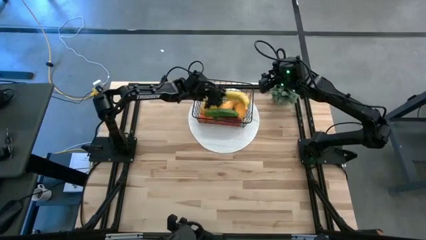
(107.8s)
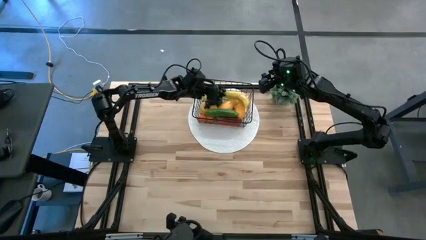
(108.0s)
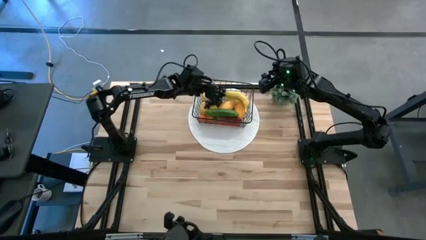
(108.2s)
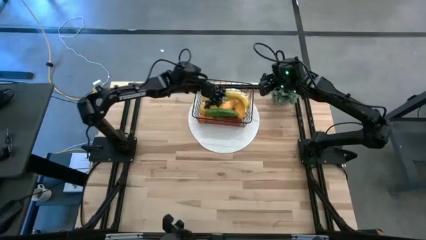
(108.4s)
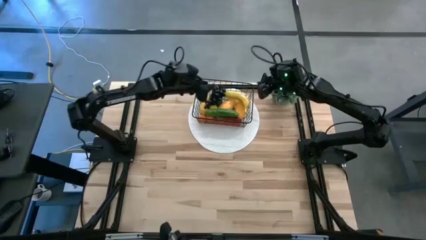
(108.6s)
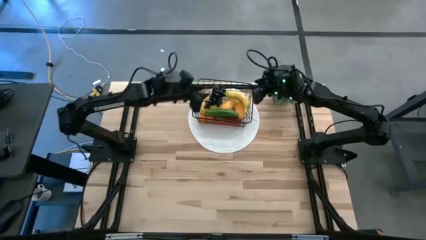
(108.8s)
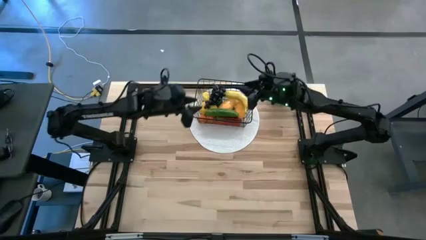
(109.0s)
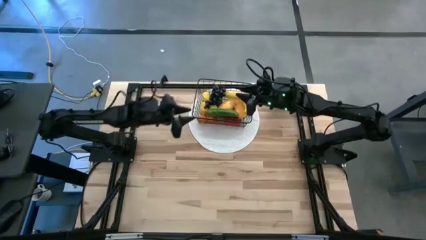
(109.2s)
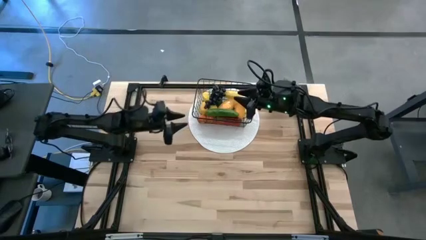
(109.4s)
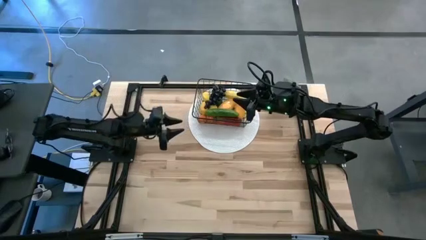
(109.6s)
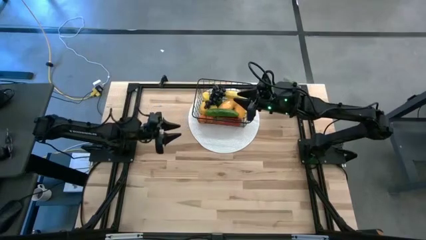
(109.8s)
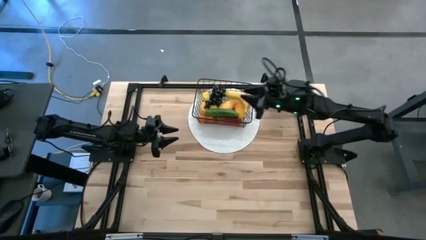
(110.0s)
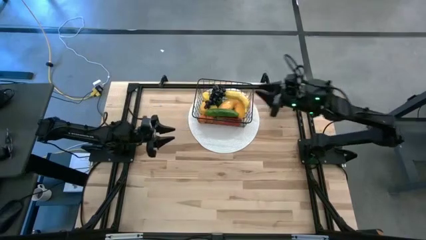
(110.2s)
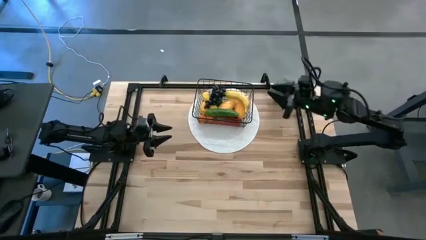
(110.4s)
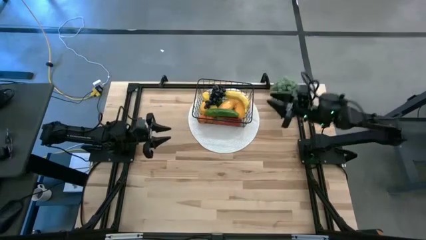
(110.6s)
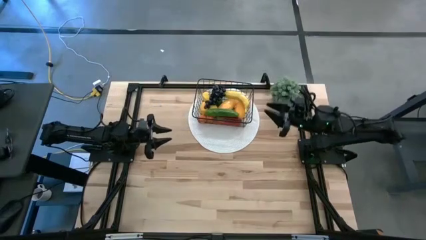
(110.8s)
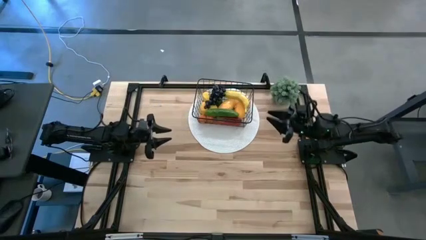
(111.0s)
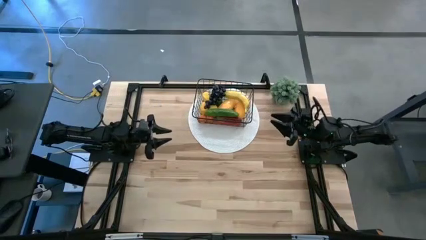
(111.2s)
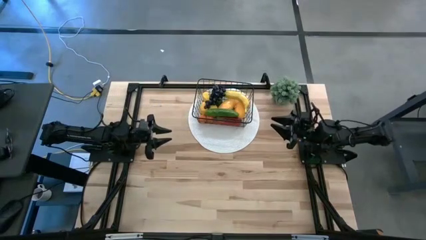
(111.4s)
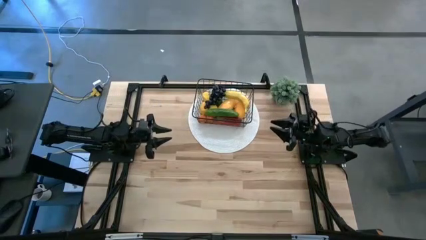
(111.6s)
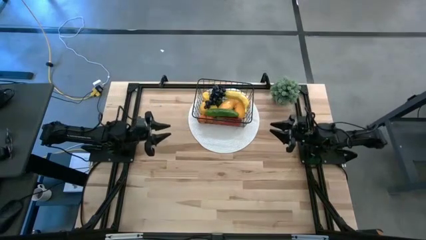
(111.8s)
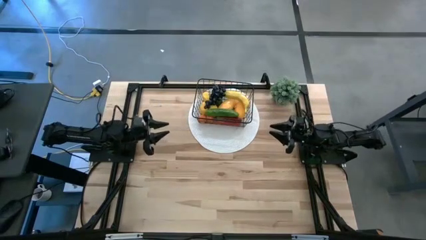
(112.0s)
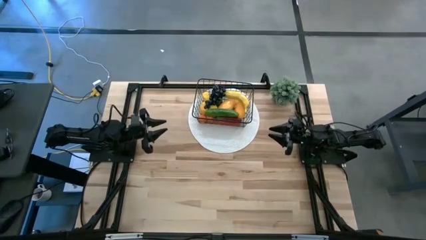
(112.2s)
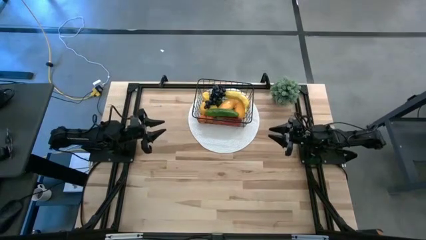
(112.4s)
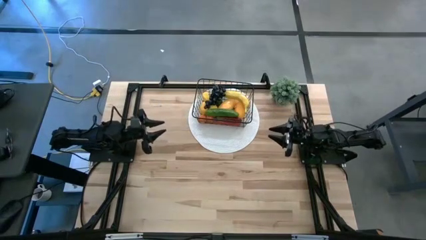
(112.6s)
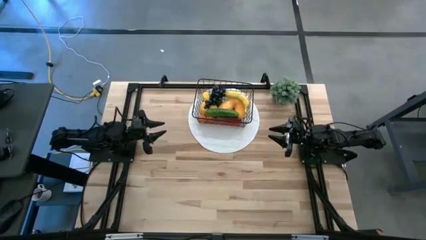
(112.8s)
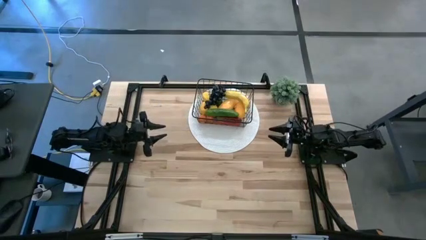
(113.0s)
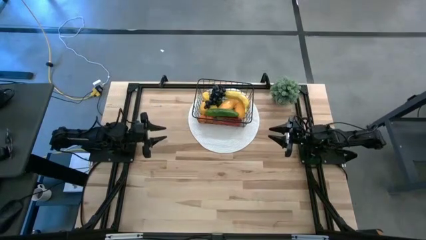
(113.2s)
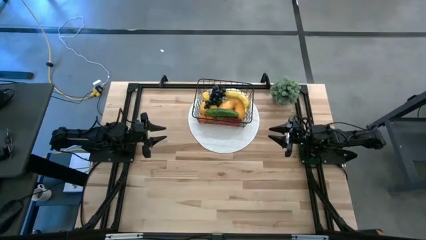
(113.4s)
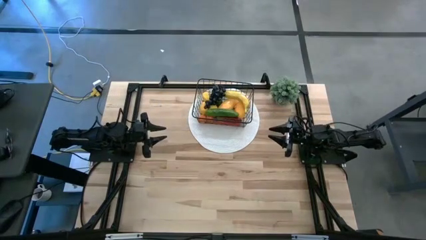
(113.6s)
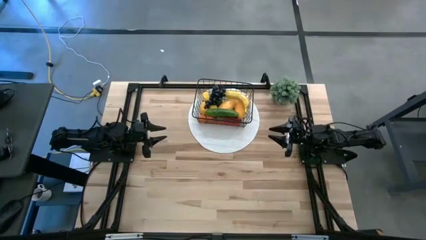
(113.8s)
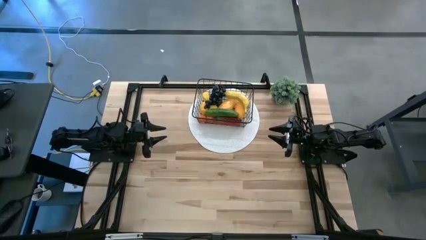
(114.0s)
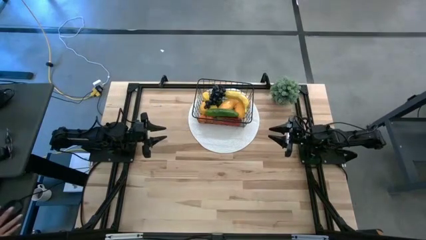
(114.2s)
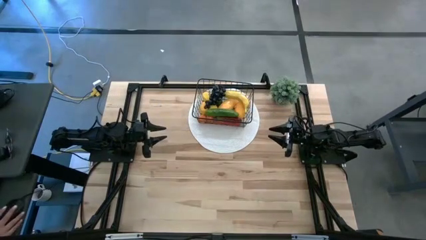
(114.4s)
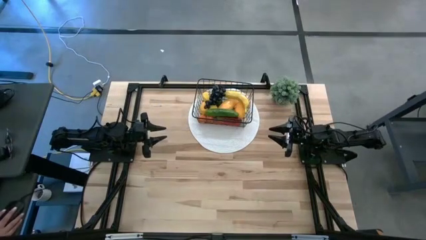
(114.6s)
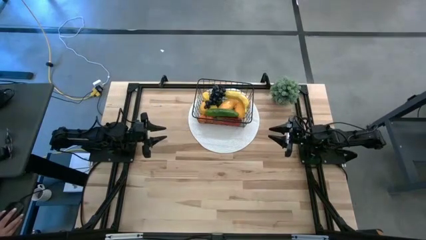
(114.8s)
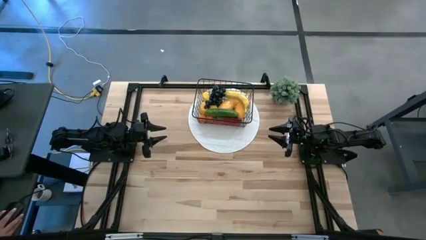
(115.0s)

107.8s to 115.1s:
Task: Build produce basket
Return to Home Position

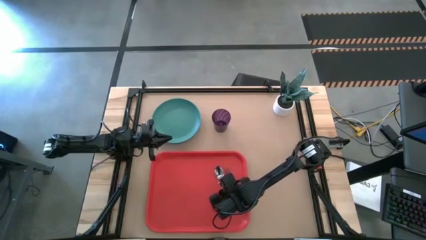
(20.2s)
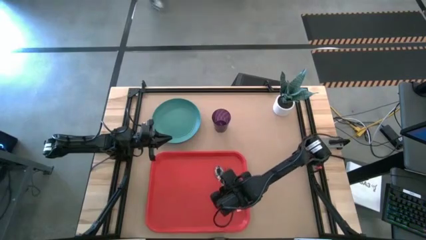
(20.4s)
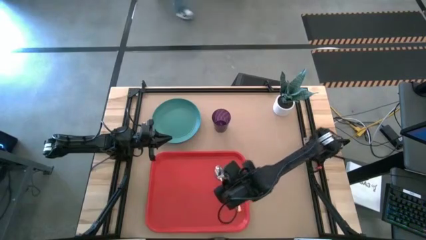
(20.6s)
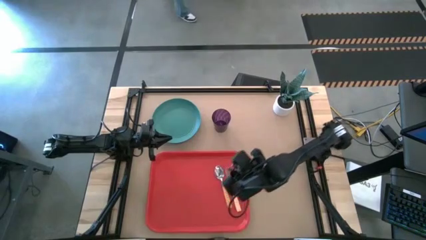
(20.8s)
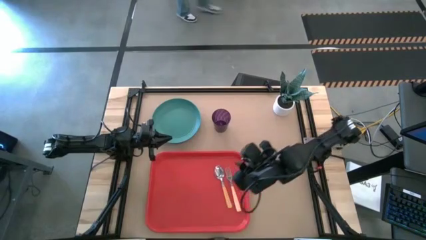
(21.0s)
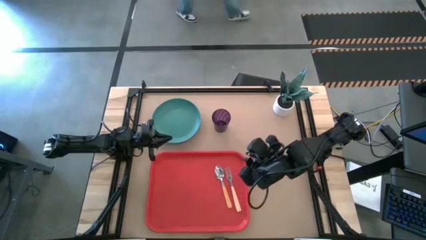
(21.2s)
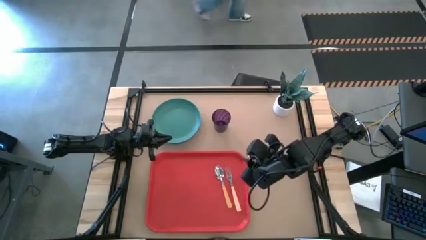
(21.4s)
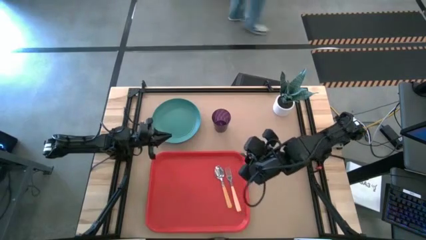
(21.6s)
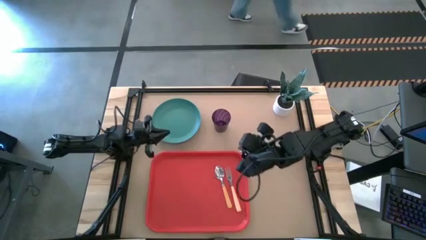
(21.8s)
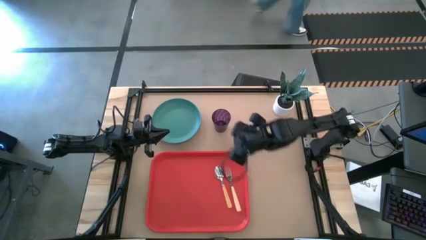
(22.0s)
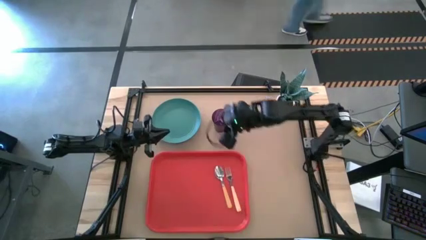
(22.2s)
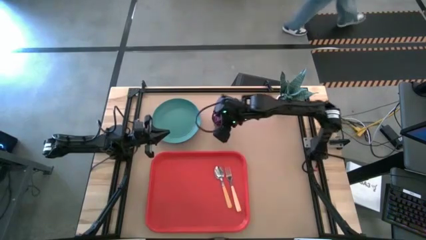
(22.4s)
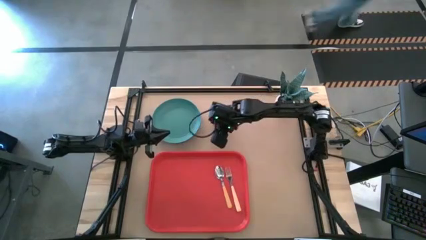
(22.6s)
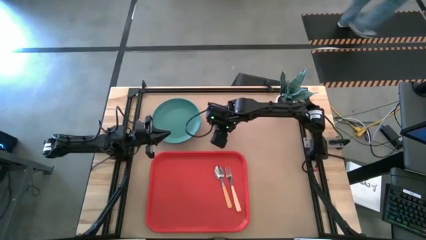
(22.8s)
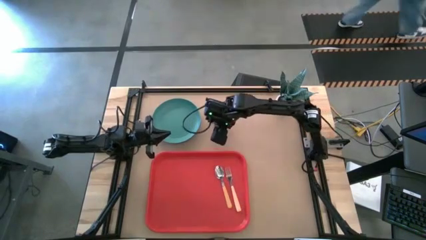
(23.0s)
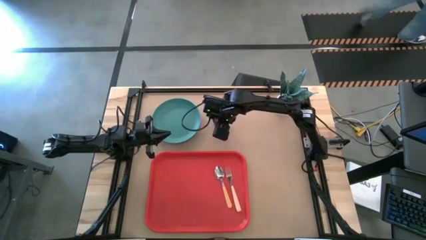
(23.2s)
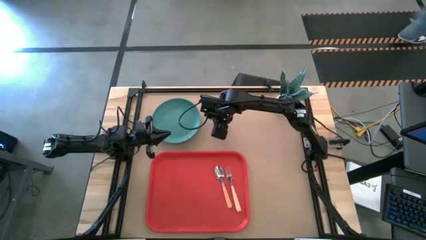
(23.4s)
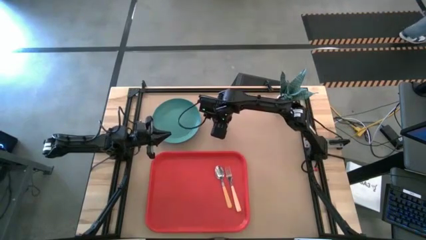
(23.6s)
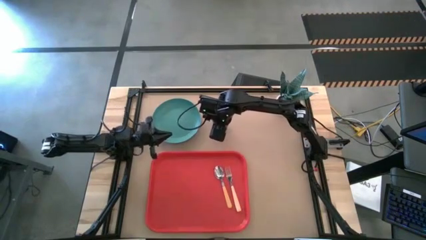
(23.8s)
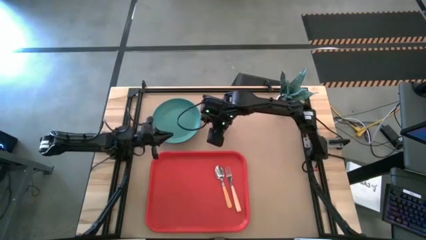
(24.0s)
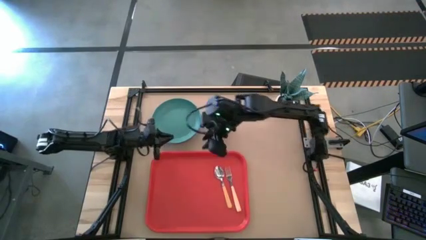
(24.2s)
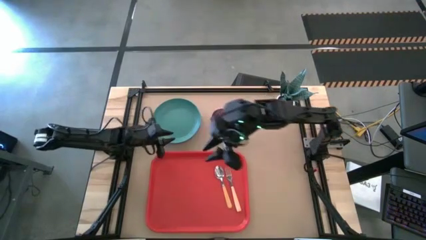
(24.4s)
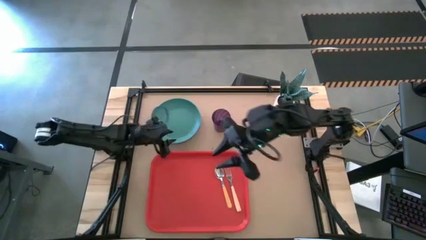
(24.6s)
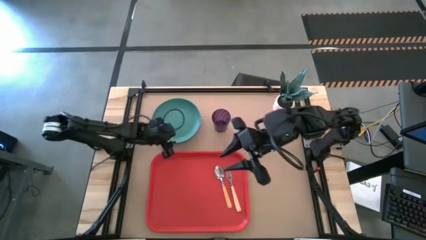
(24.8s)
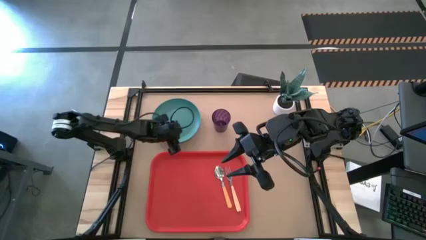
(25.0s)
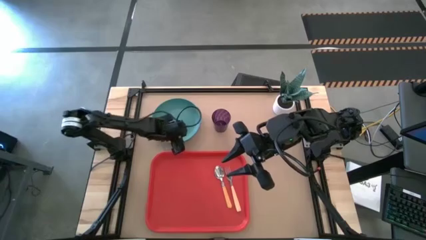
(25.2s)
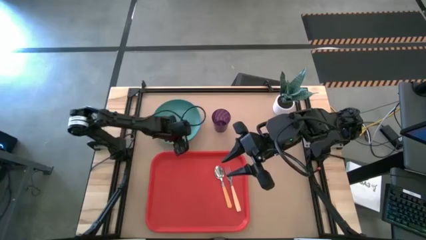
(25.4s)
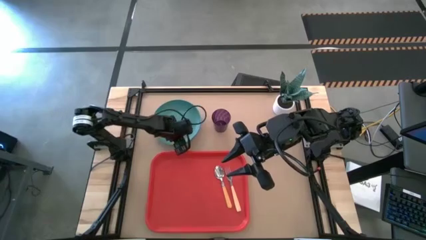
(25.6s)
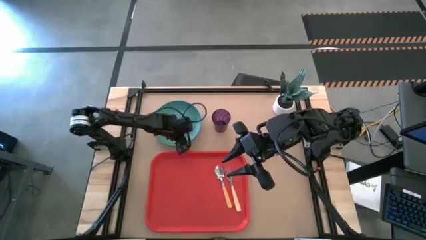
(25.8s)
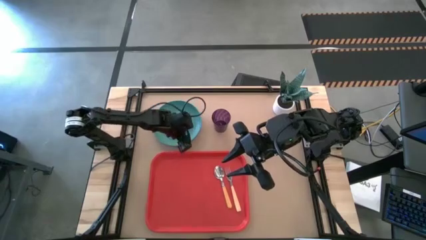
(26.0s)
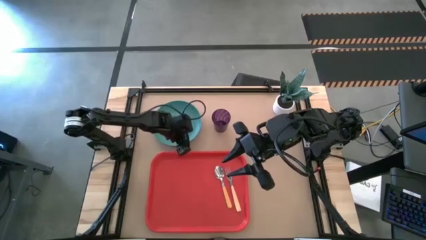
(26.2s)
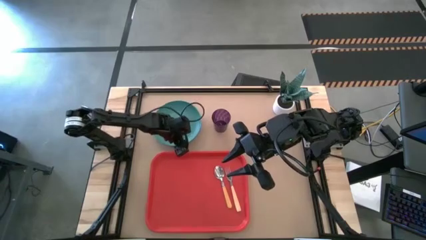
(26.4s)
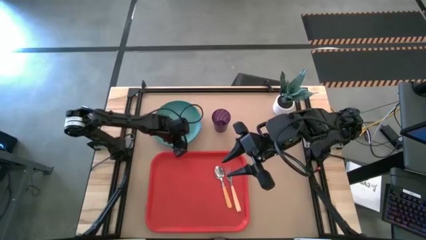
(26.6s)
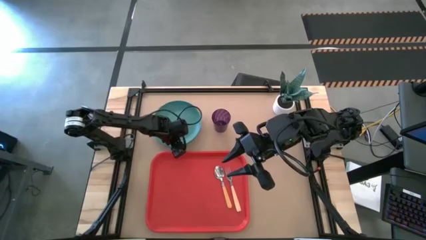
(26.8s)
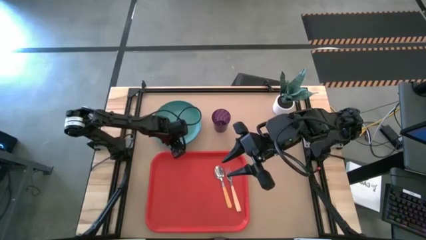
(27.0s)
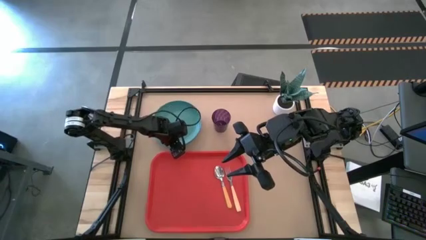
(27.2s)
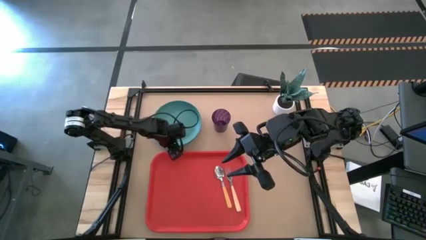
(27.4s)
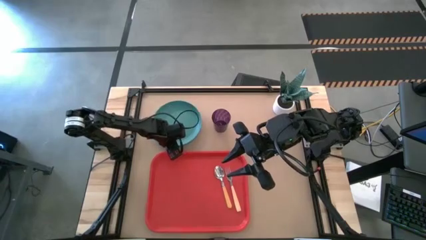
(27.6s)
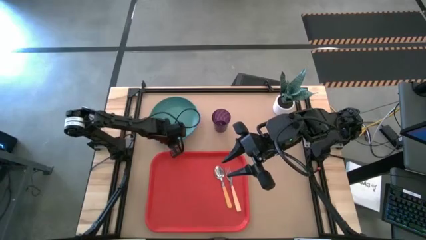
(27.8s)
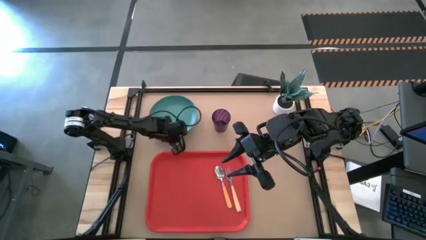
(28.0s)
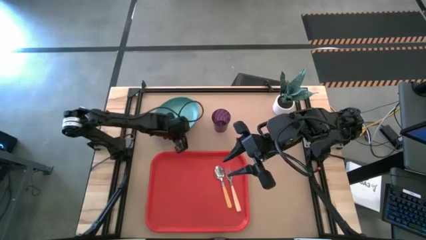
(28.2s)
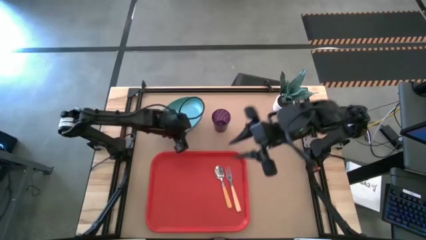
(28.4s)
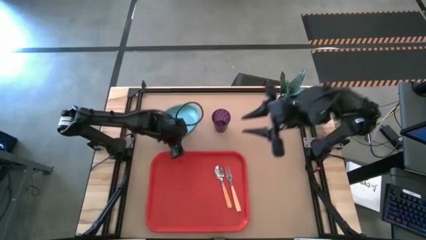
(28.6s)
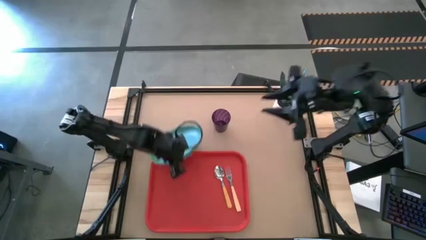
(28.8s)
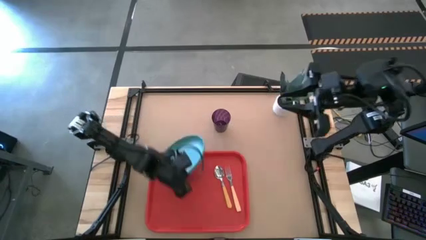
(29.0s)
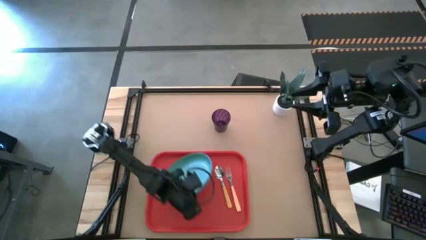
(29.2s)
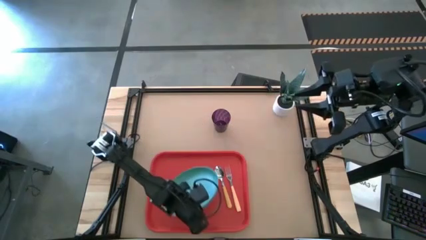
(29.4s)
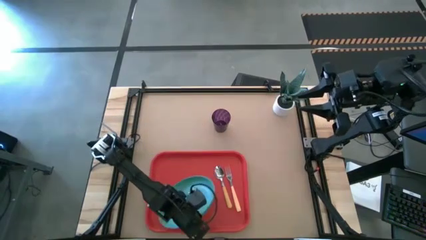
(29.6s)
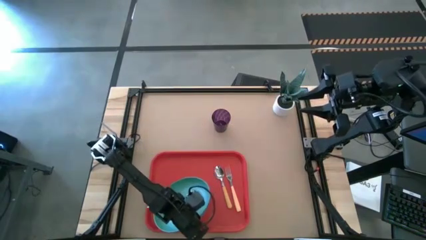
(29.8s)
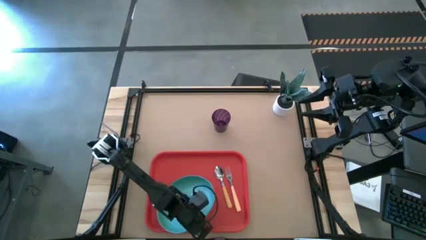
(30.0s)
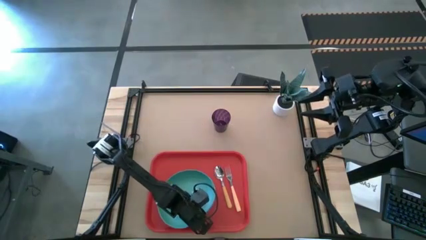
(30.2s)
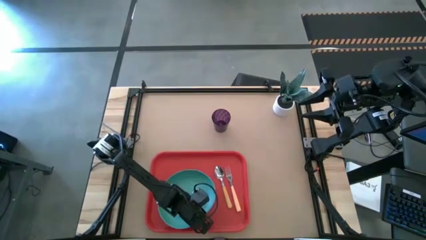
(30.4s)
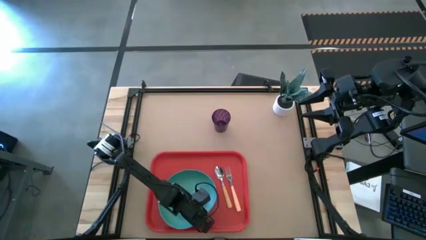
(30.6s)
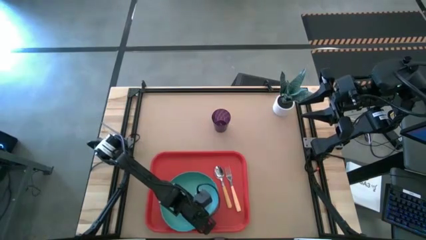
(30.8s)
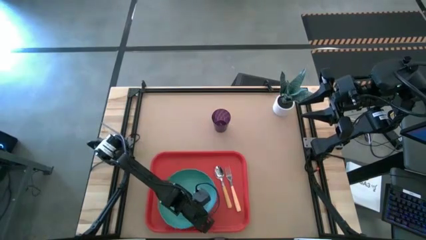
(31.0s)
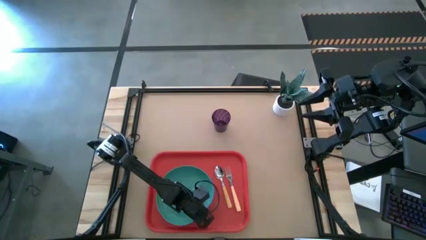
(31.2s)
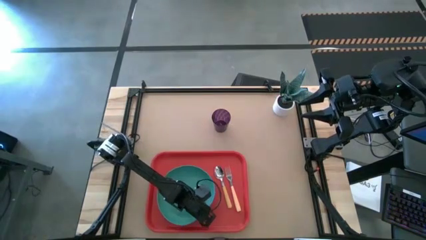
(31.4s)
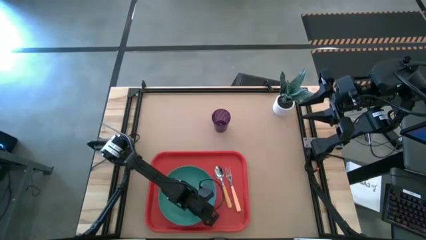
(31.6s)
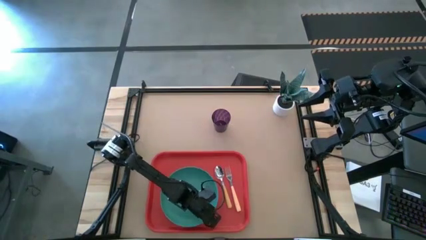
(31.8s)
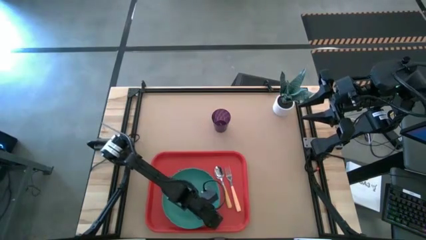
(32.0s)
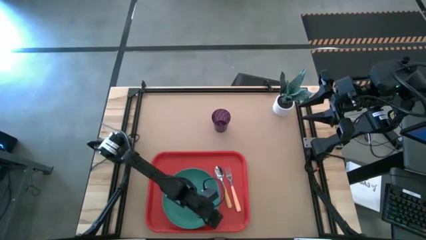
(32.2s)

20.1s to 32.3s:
Task: Pick and place plate/cup/fork/spoon on tray
Put the green plate on the red serving tray to the left of the orange spoon
